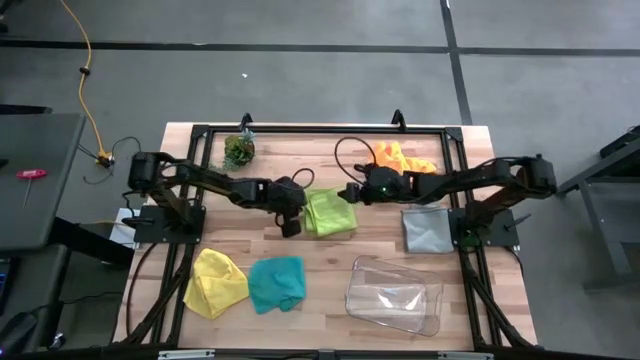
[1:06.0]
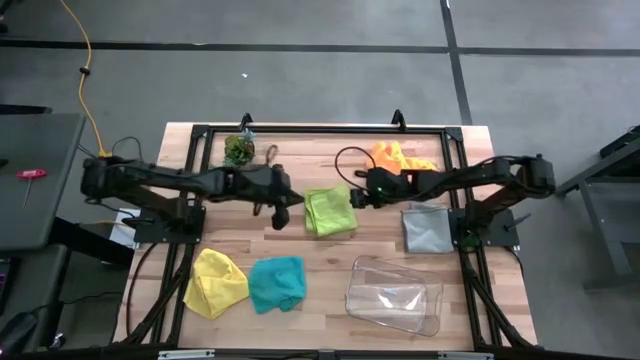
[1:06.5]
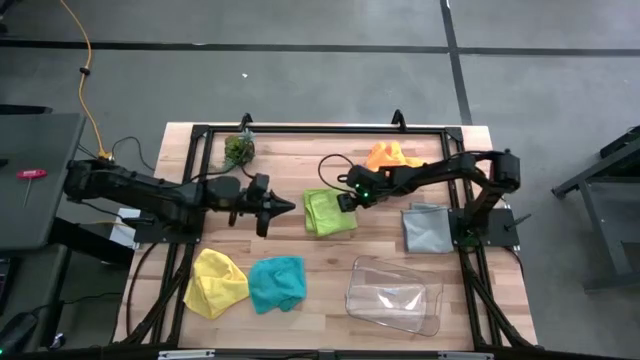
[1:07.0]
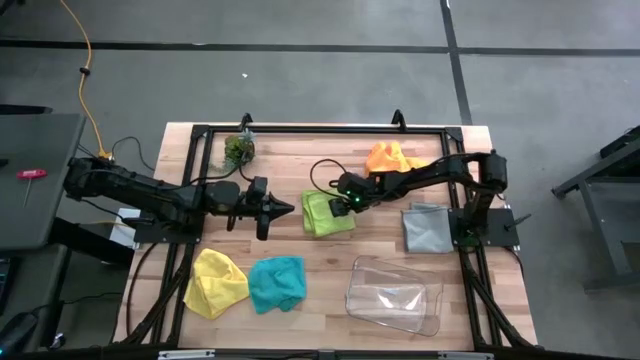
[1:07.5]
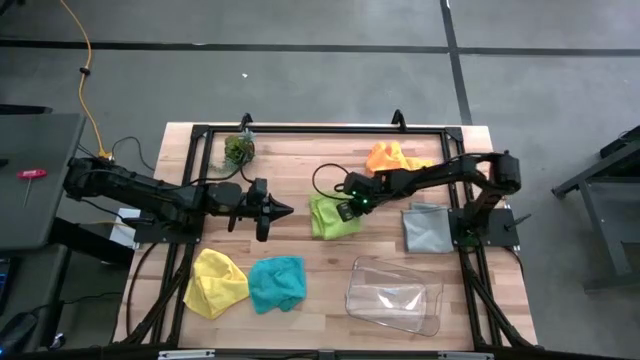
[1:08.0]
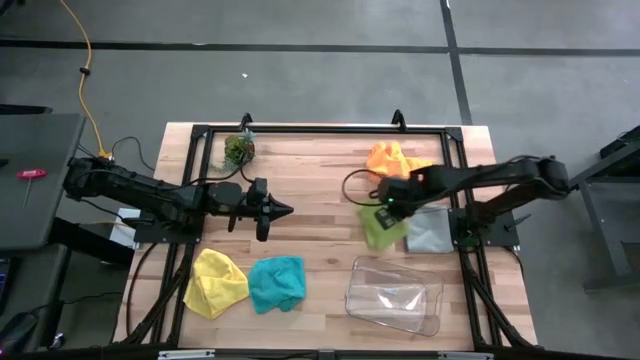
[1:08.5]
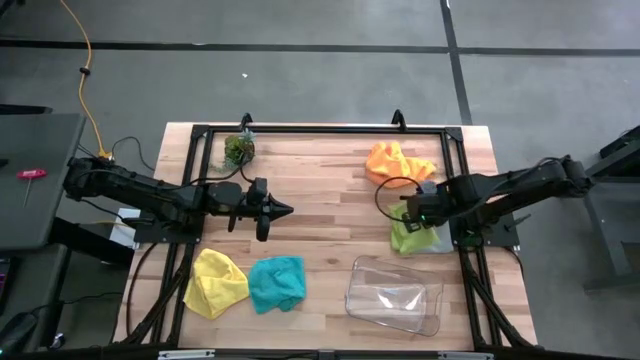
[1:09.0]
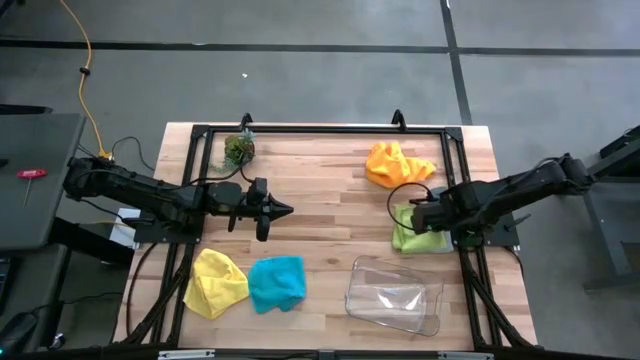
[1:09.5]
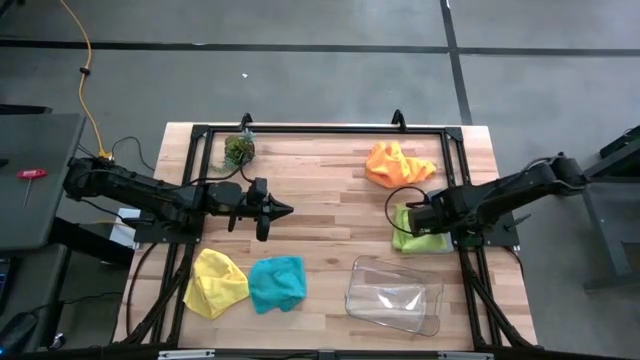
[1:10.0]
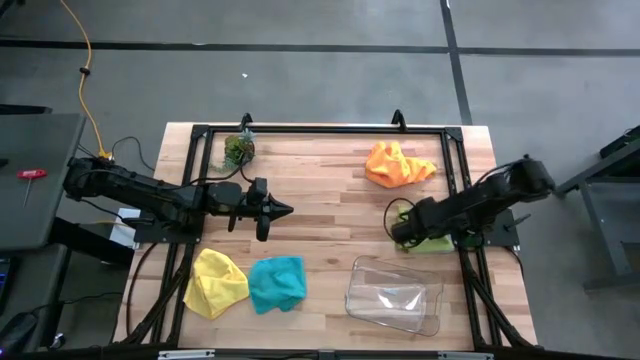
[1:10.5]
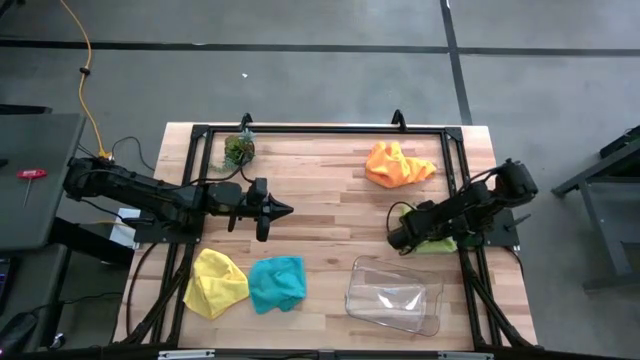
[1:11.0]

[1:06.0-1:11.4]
Task: Fold microfiber towels
Stack the green cloth on the gray cloth

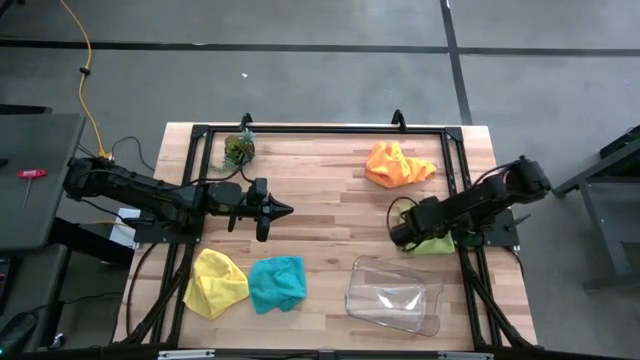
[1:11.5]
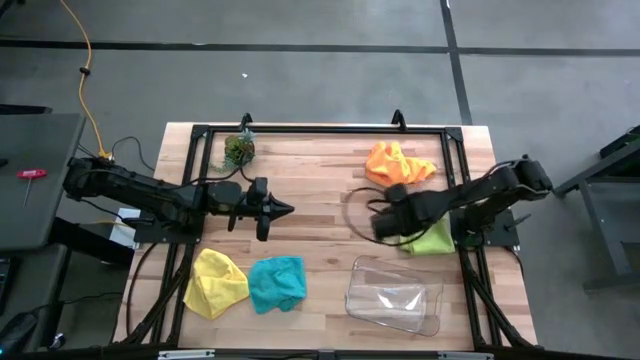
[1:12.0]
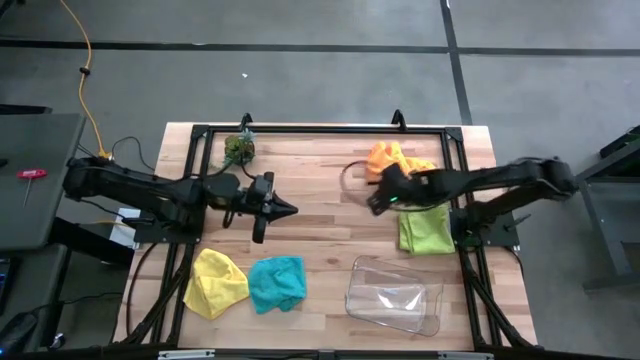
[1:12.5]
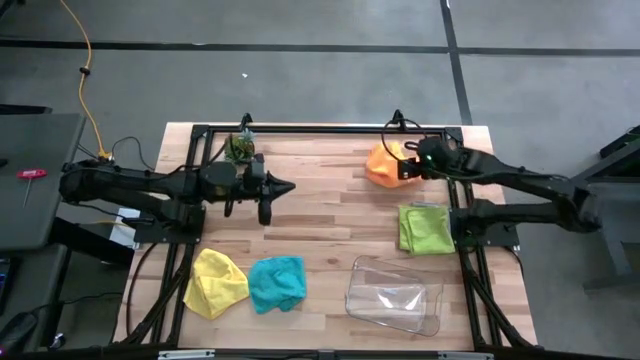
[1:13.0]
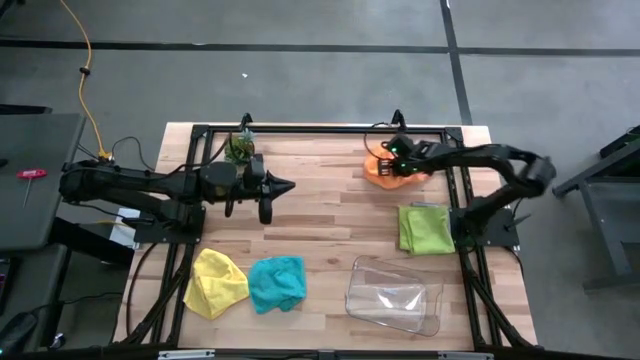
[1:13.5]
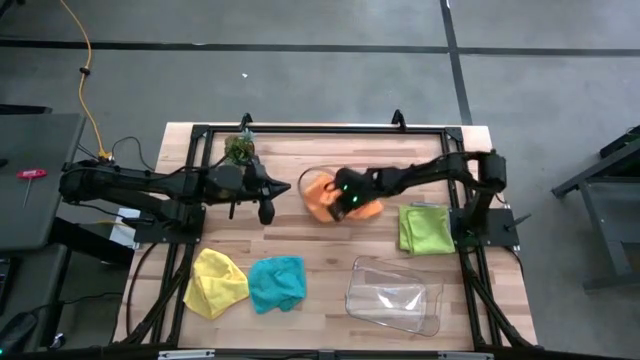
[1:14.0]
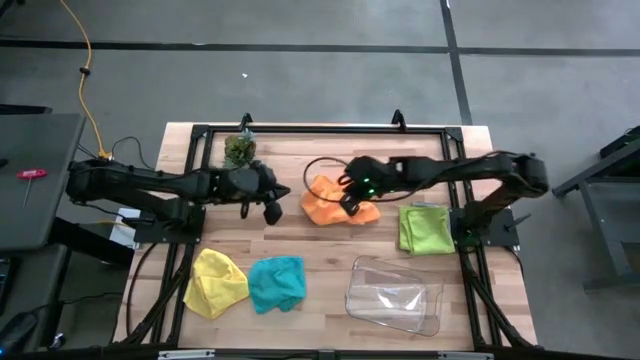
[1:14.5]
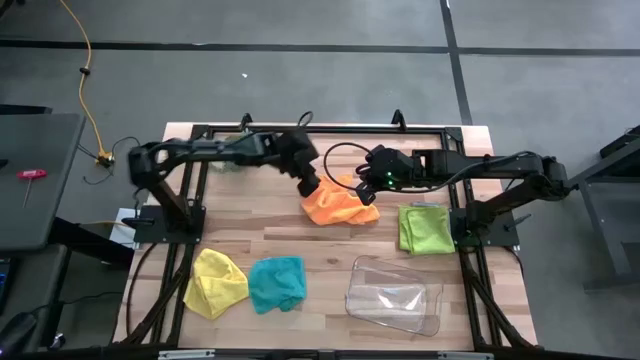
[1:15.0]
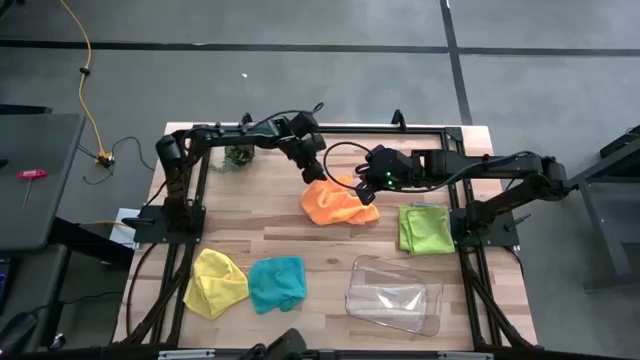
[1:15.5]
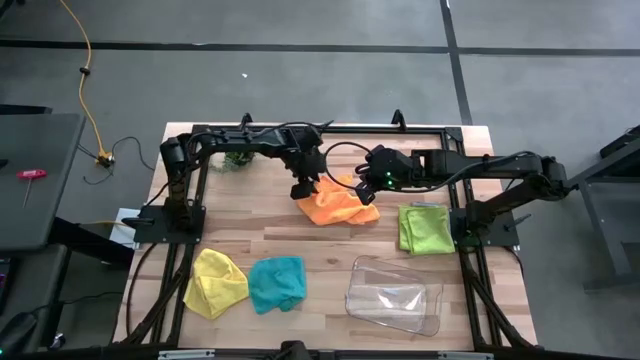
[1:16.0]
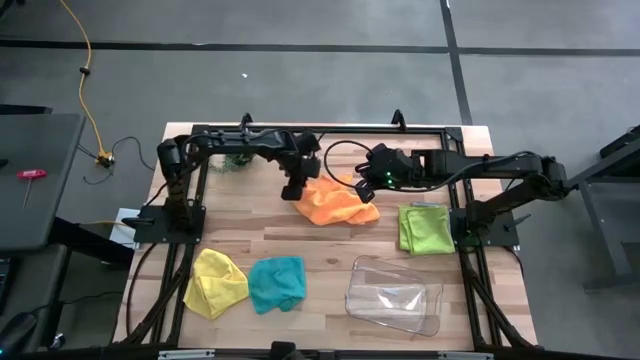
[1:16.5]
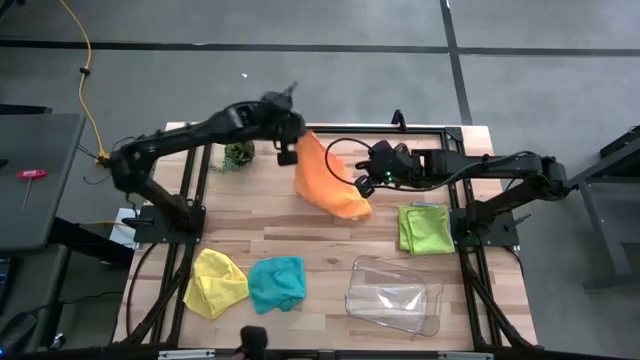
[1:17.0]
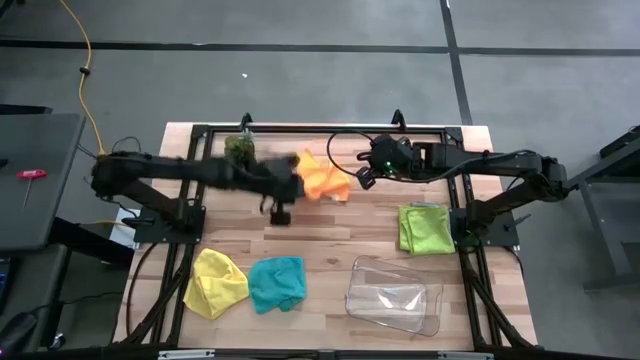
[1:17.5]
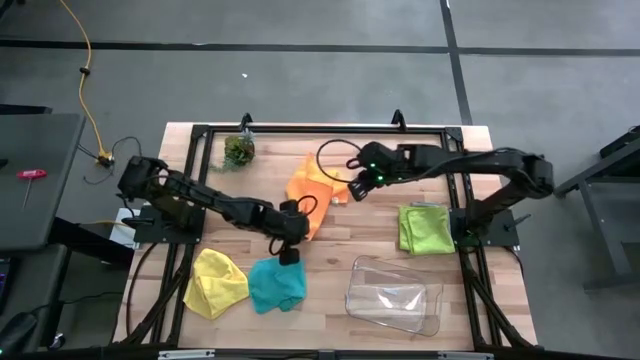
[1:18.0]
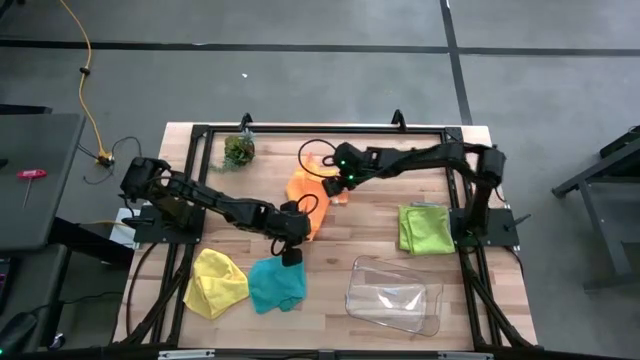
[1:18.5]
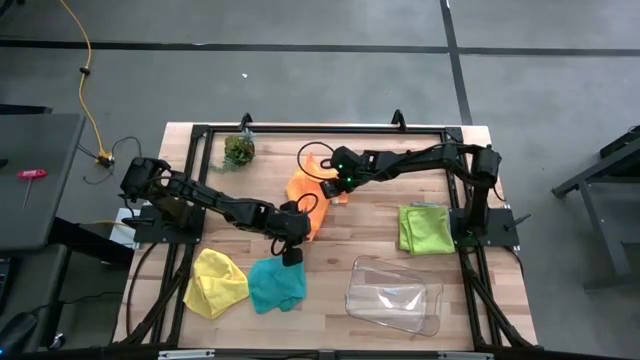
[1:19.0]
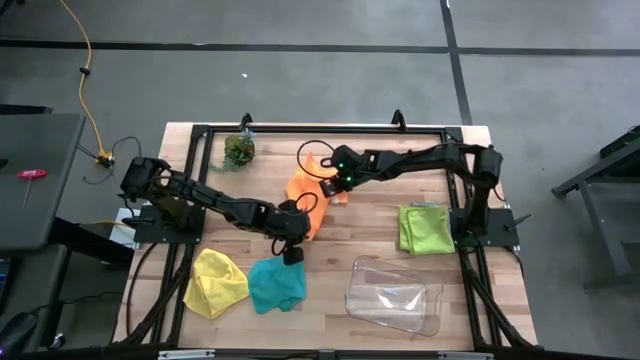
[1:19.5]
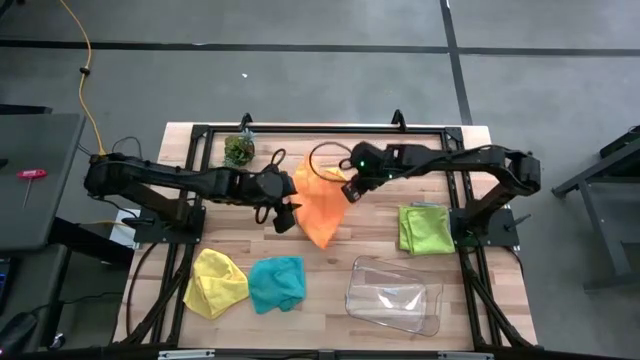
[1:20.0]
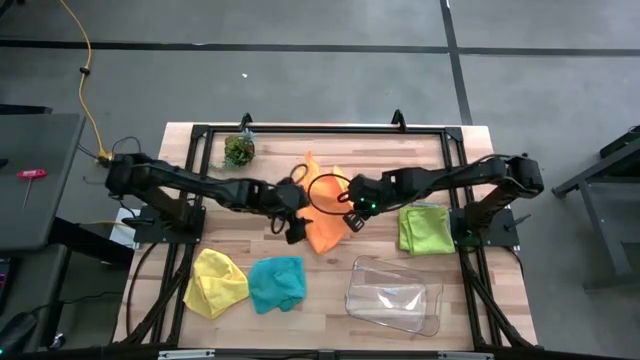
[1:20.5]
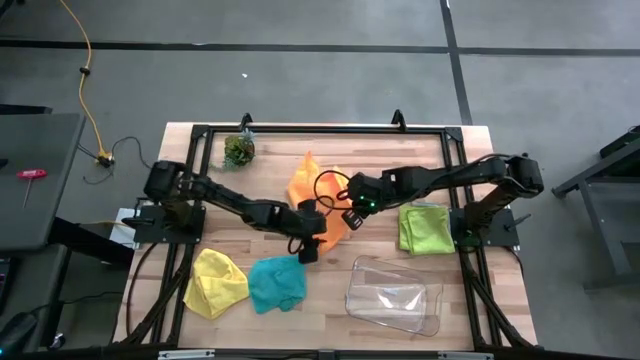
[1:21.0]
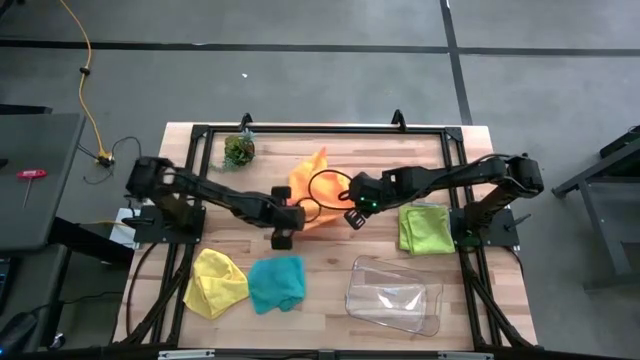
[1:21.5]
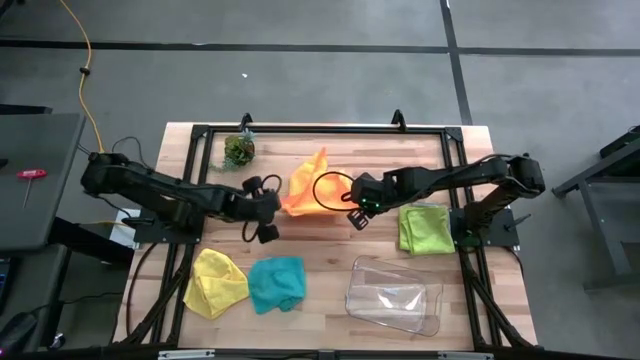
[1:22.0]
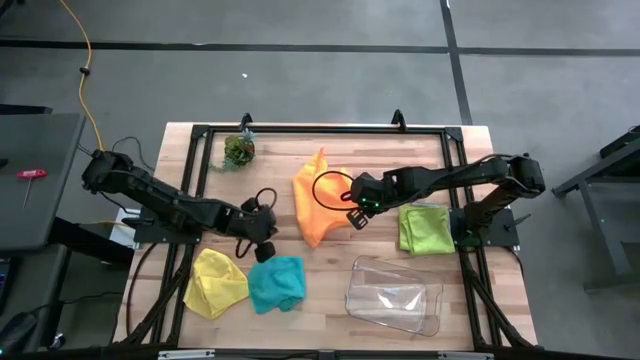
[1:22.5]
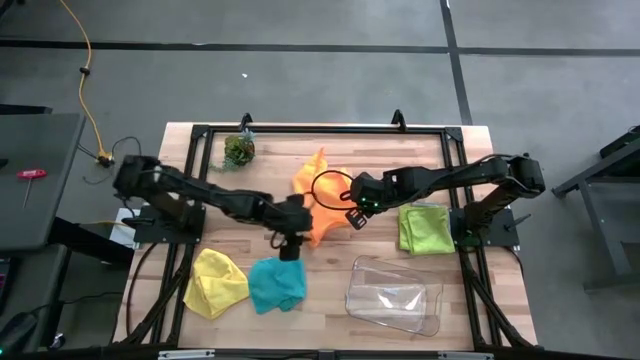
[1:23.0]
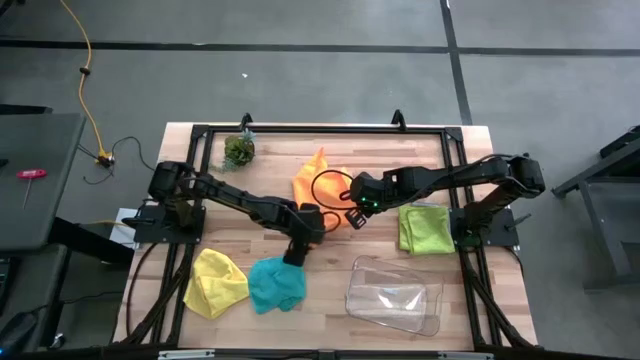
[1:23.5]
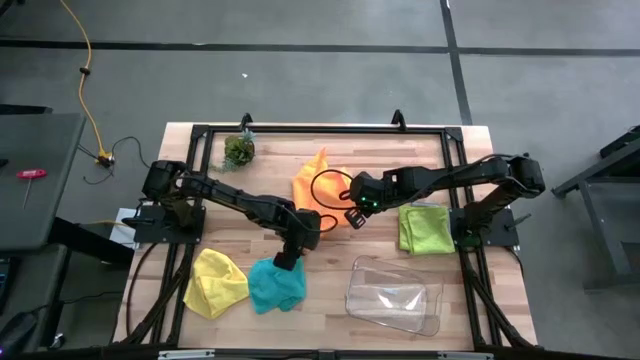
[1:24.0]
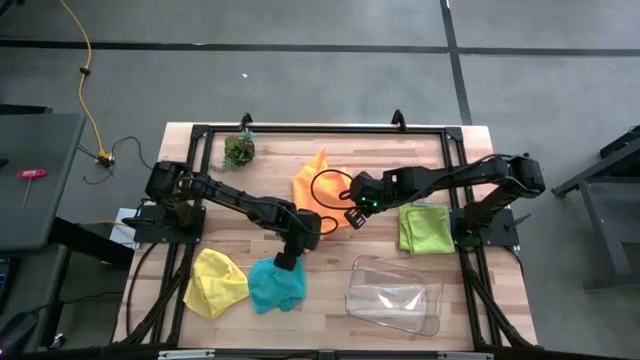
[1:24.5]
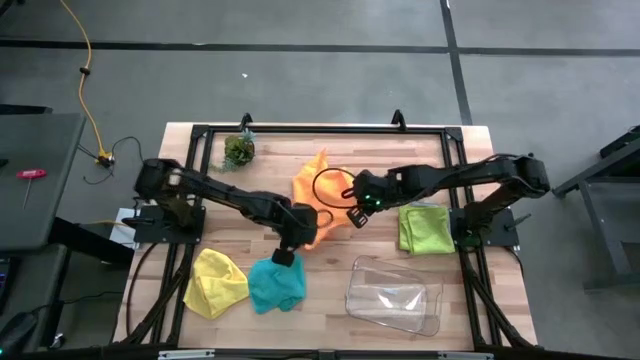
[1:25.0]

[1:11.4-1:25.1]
Fold the orange cloth

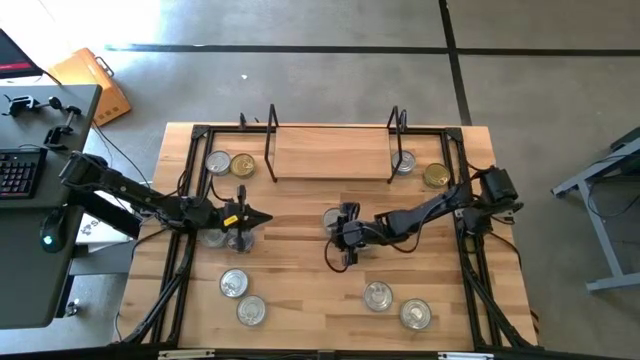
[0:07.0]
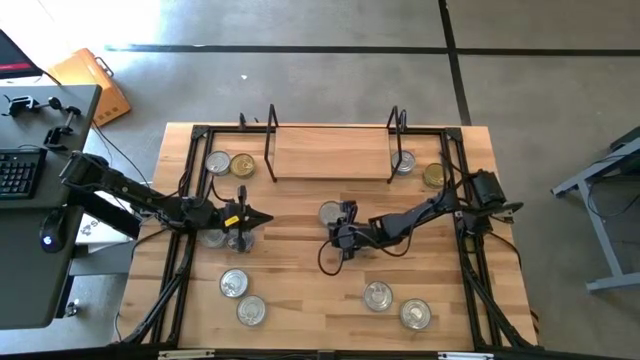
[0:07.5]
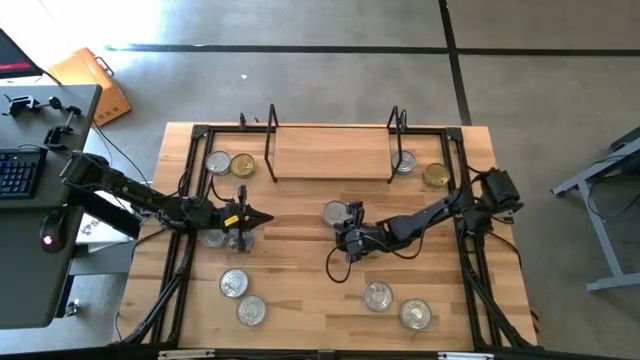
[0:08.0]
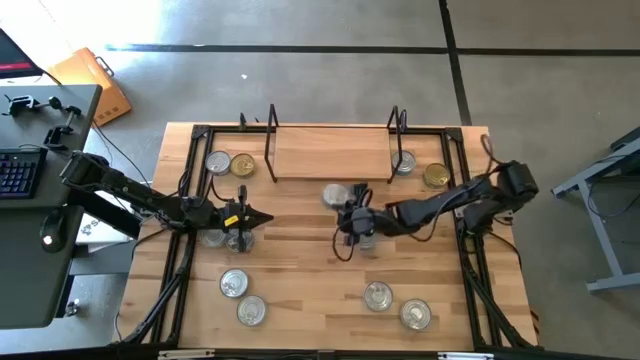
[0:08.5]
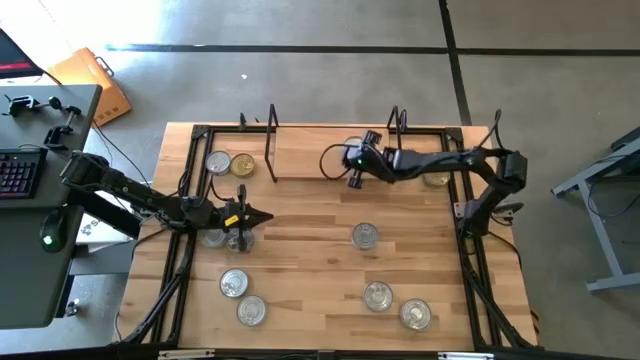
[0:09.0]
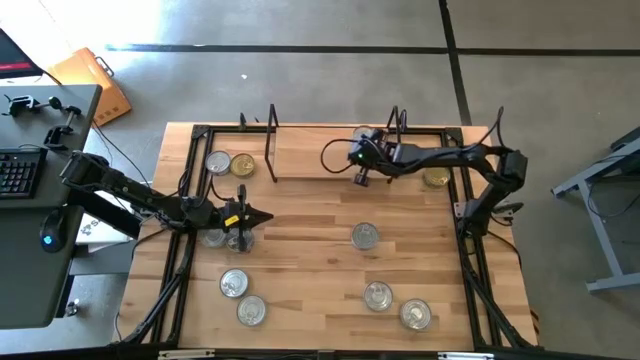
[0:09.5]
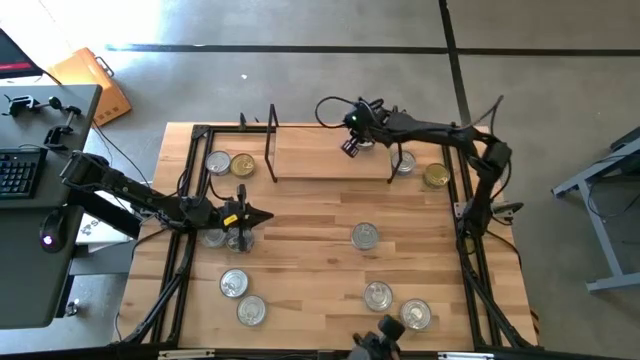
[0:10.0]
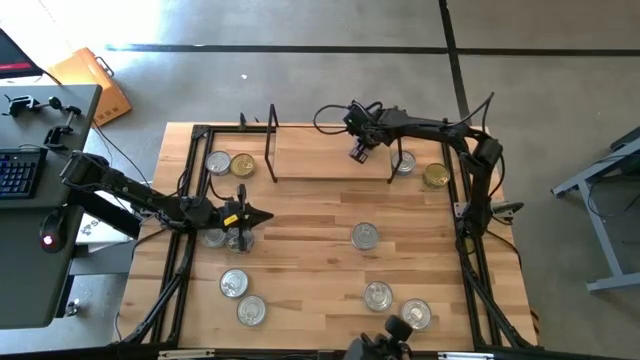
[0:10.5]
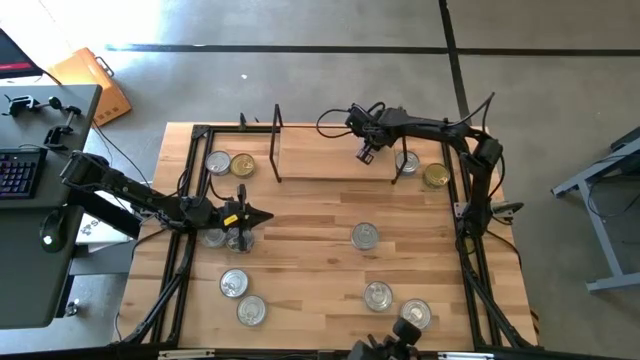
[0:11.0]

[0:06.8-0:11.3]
Task: Stack canned seafood by type on shelf
Put the blue tuna can on the shelf
